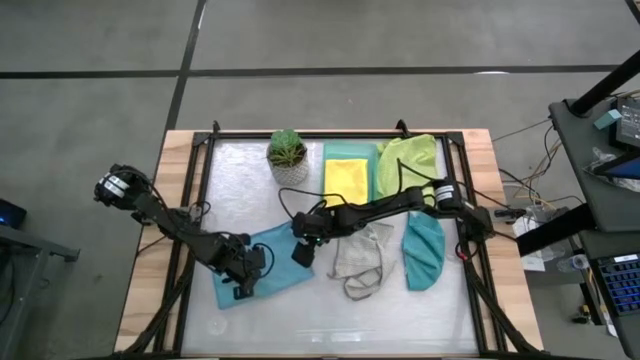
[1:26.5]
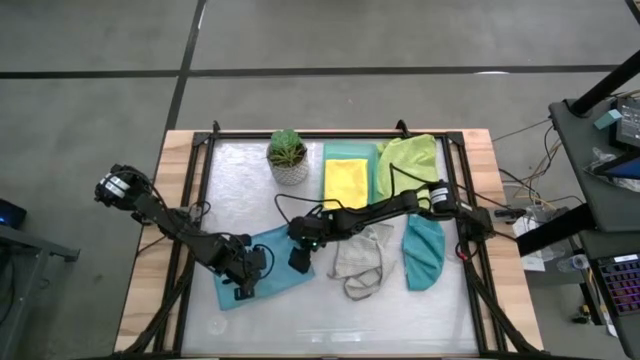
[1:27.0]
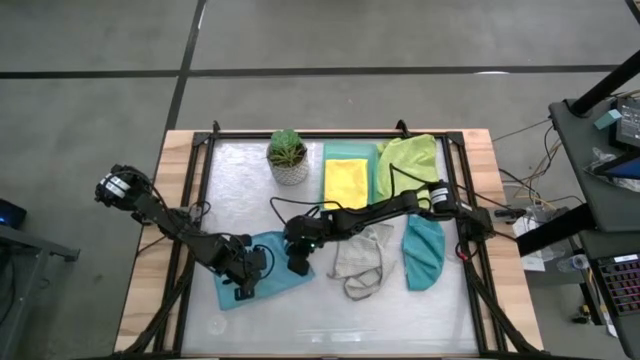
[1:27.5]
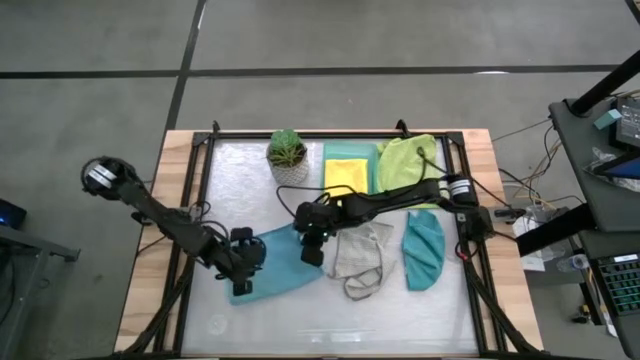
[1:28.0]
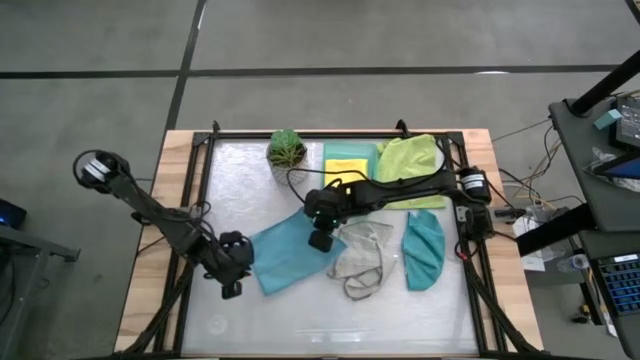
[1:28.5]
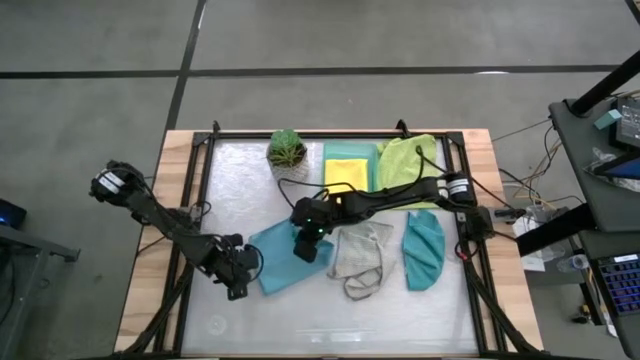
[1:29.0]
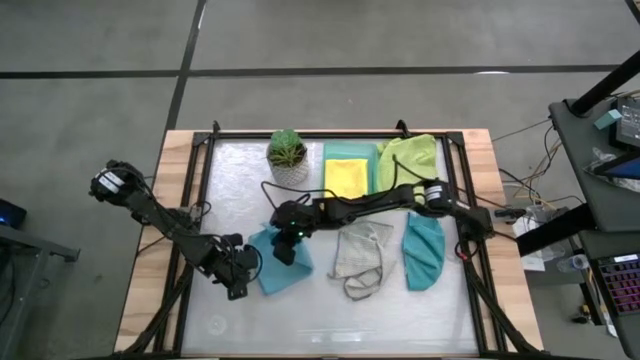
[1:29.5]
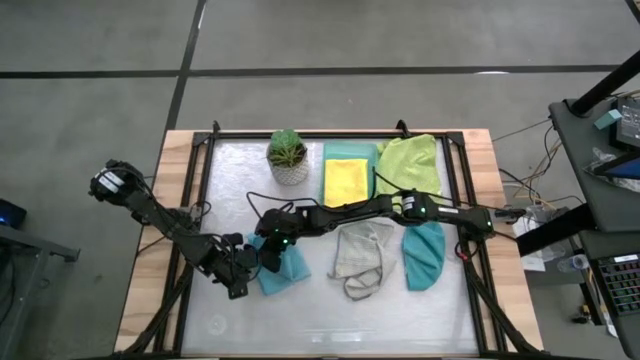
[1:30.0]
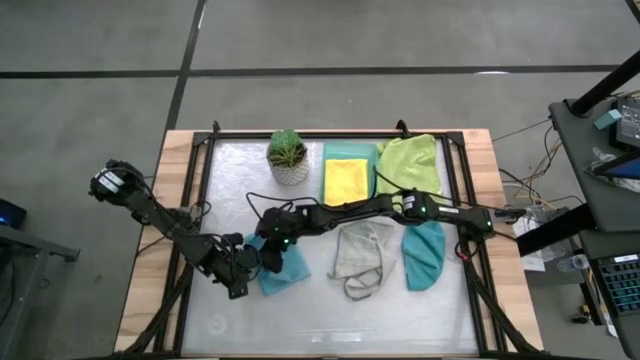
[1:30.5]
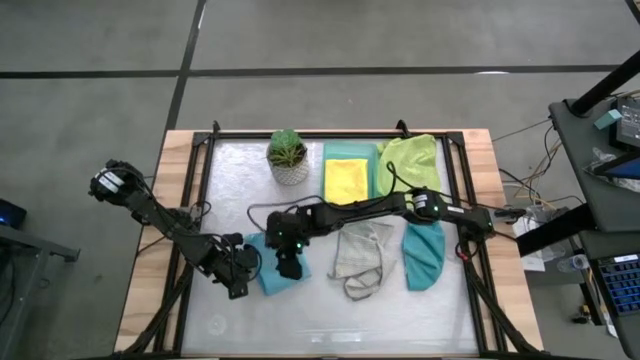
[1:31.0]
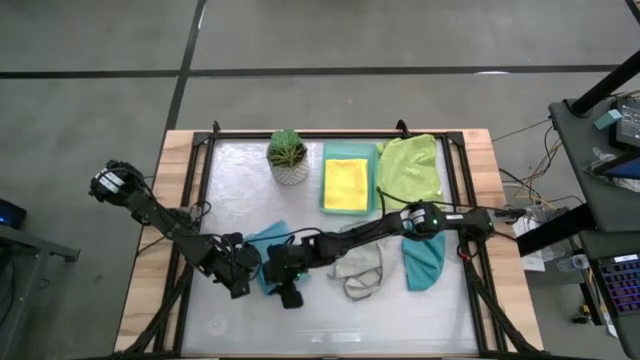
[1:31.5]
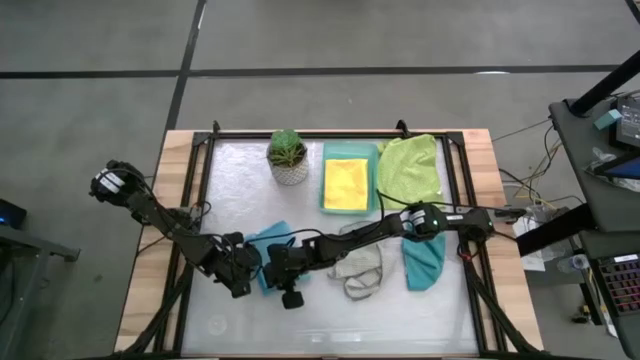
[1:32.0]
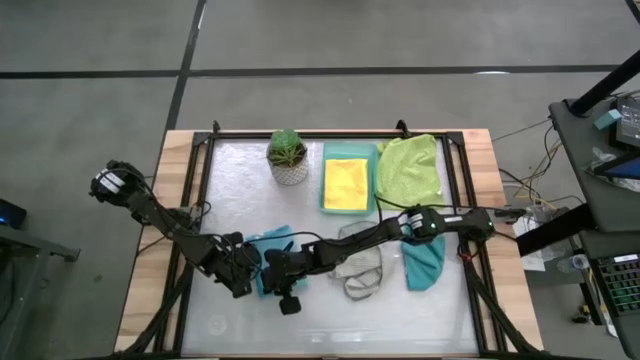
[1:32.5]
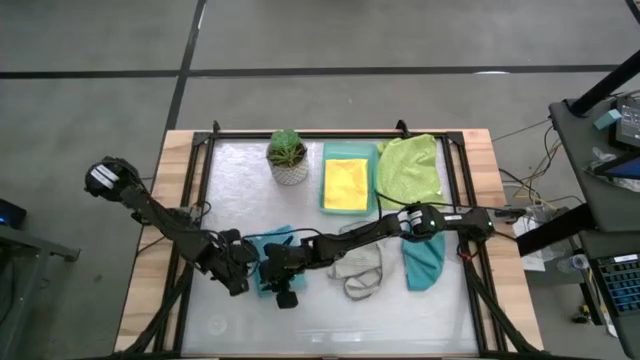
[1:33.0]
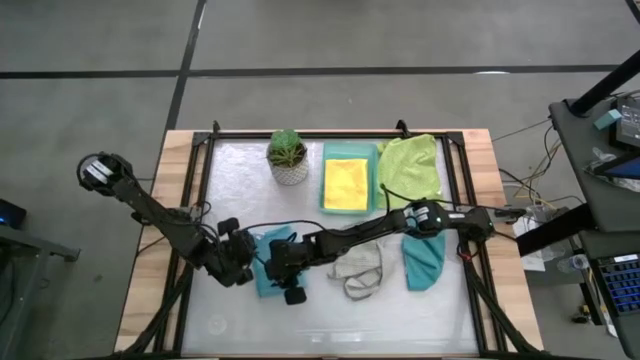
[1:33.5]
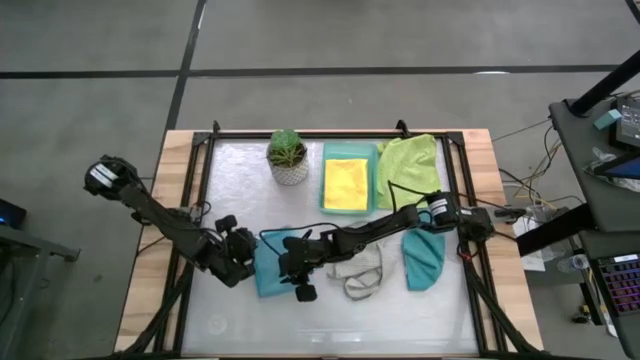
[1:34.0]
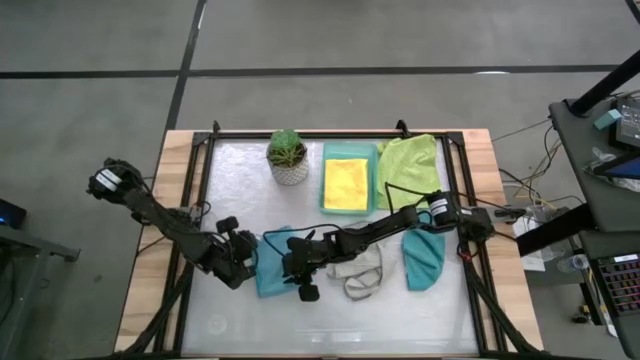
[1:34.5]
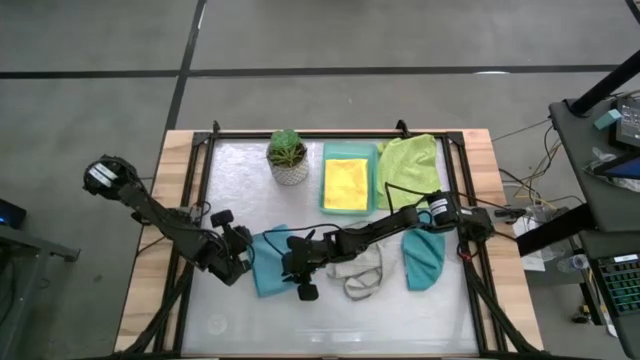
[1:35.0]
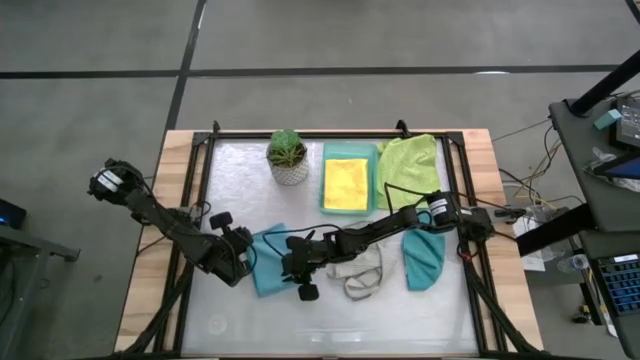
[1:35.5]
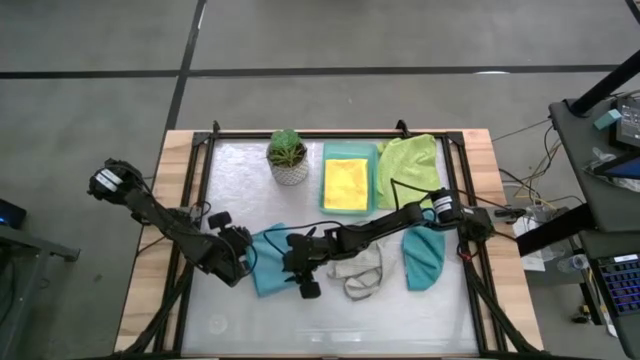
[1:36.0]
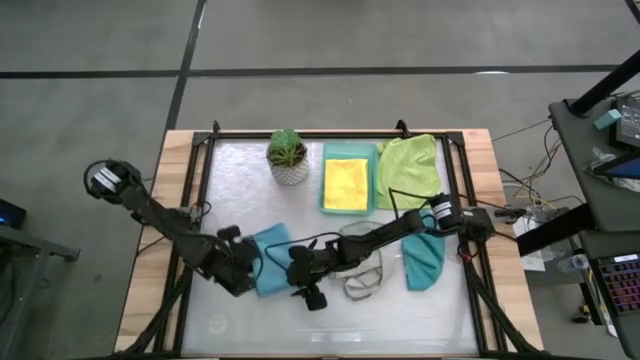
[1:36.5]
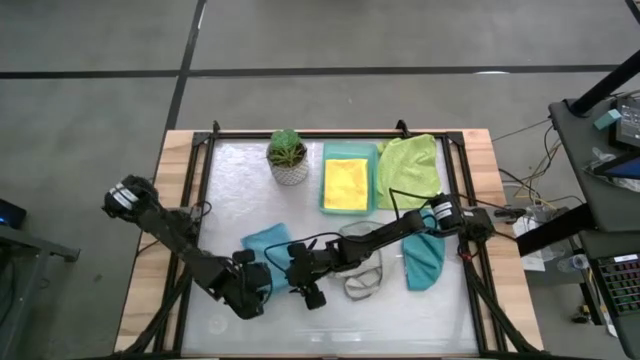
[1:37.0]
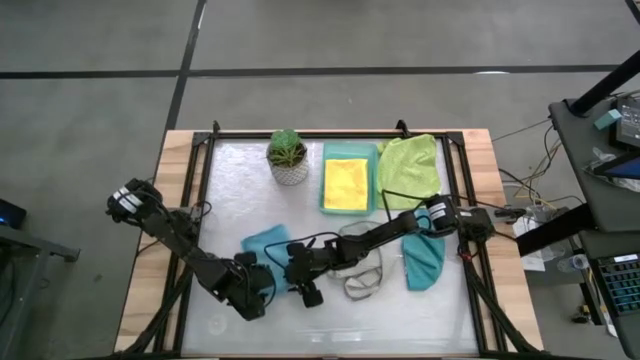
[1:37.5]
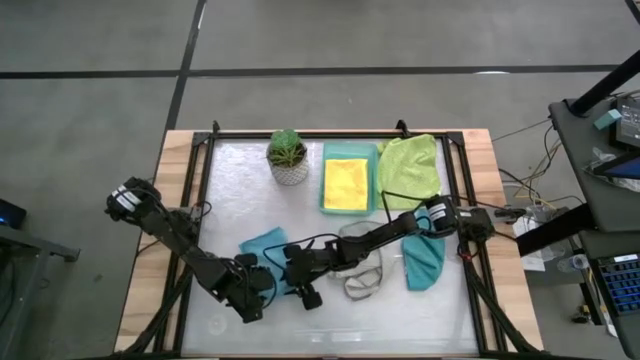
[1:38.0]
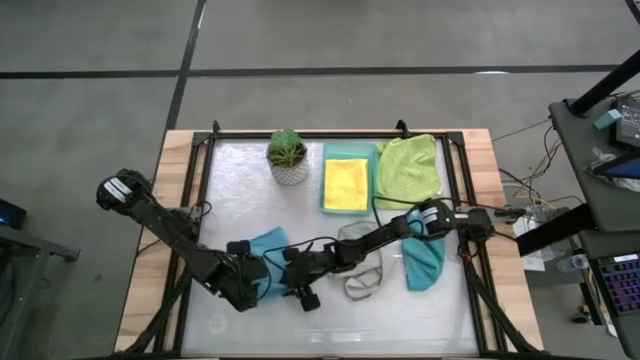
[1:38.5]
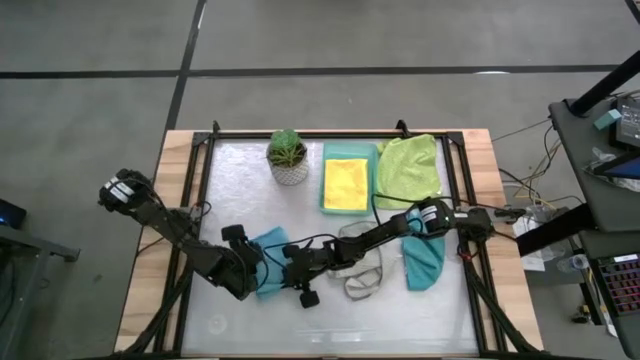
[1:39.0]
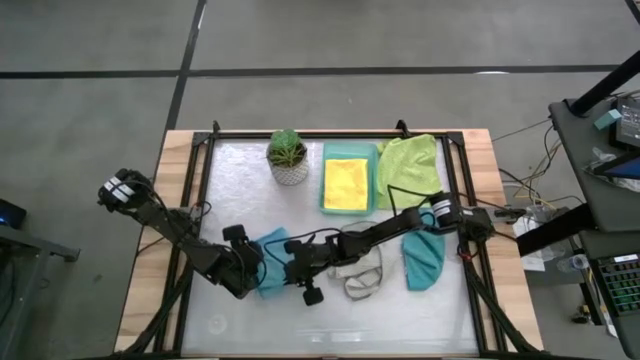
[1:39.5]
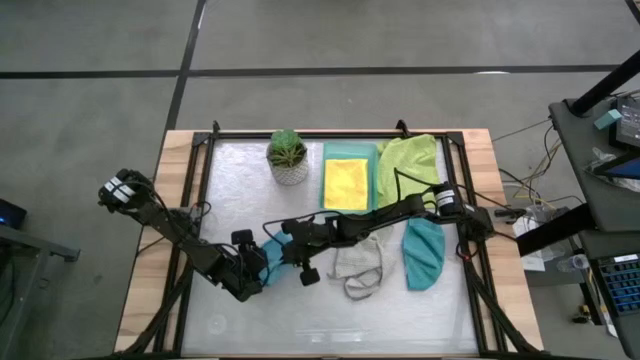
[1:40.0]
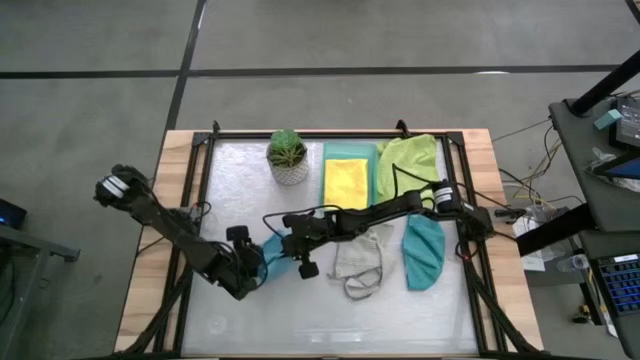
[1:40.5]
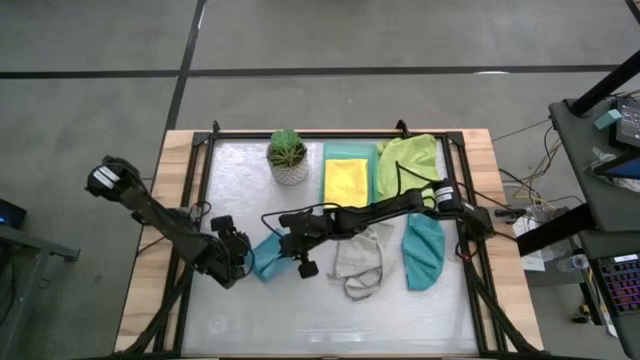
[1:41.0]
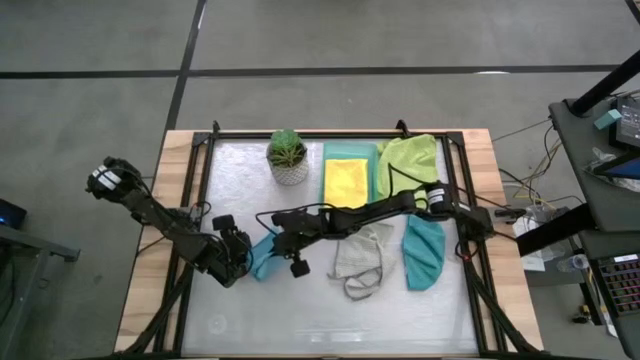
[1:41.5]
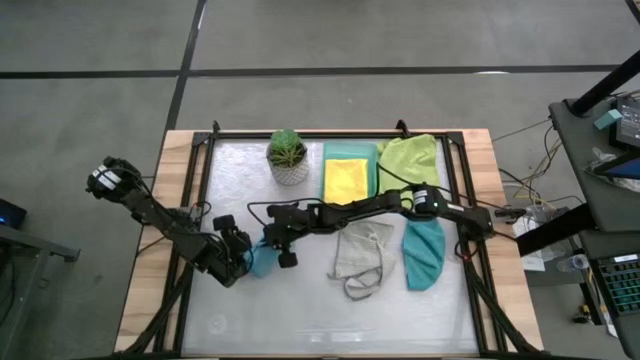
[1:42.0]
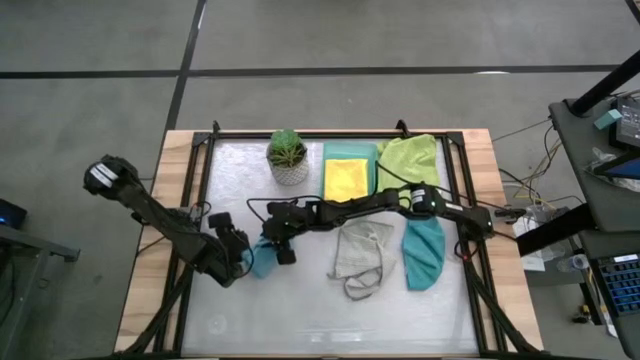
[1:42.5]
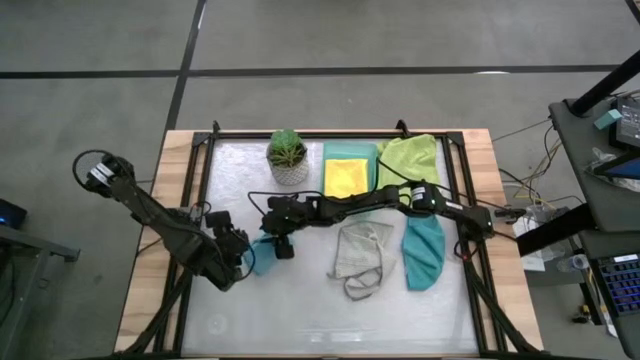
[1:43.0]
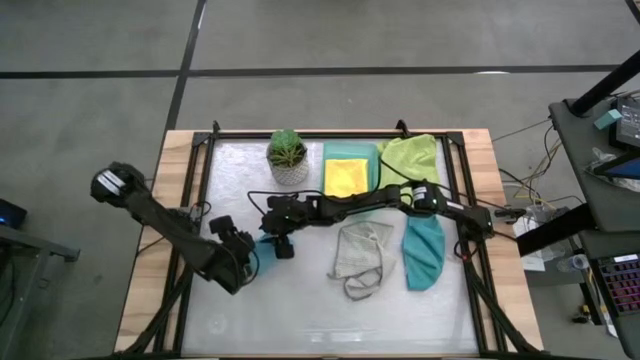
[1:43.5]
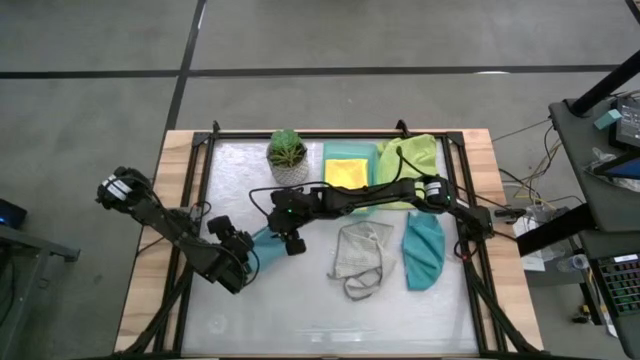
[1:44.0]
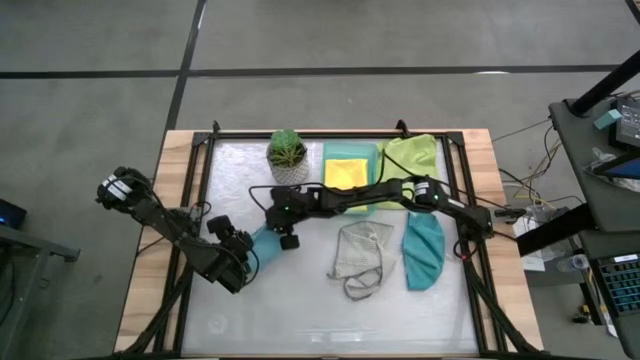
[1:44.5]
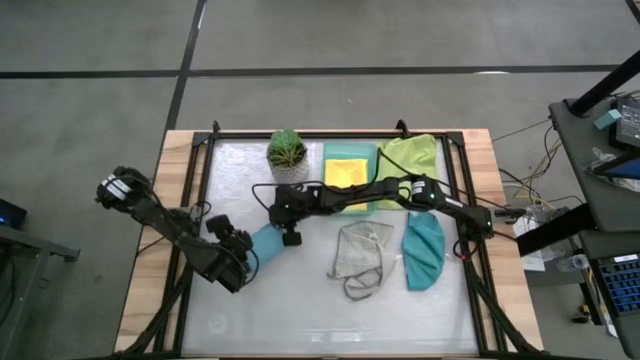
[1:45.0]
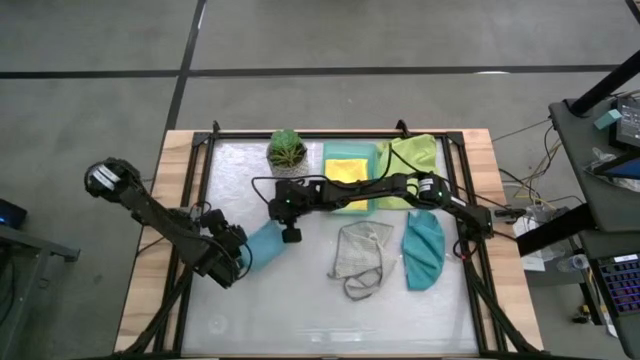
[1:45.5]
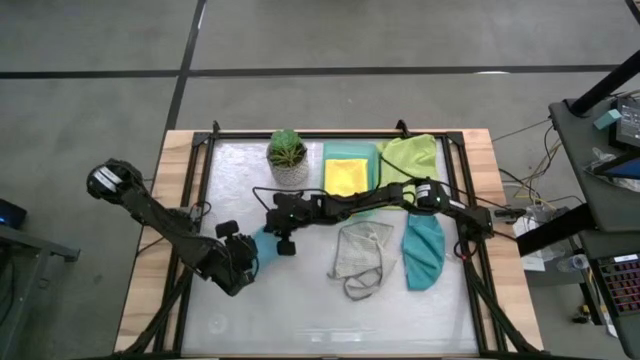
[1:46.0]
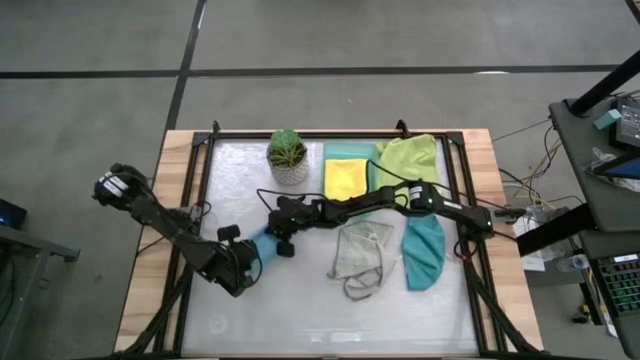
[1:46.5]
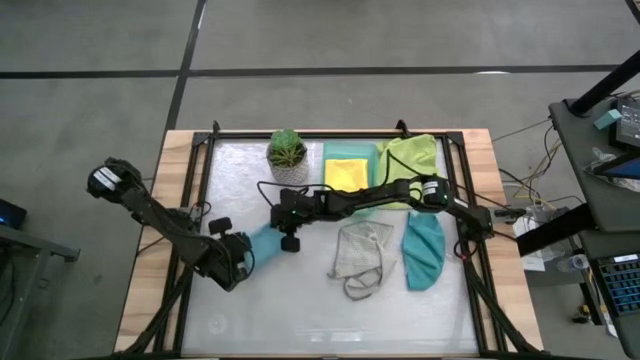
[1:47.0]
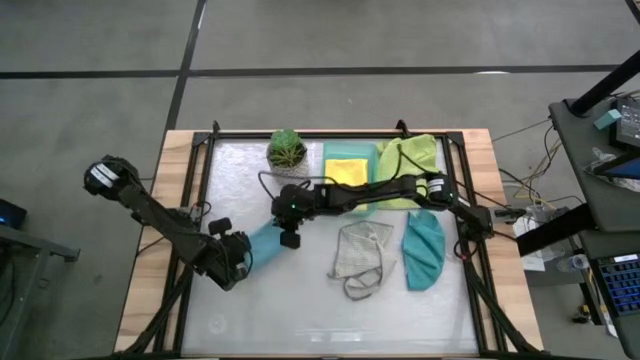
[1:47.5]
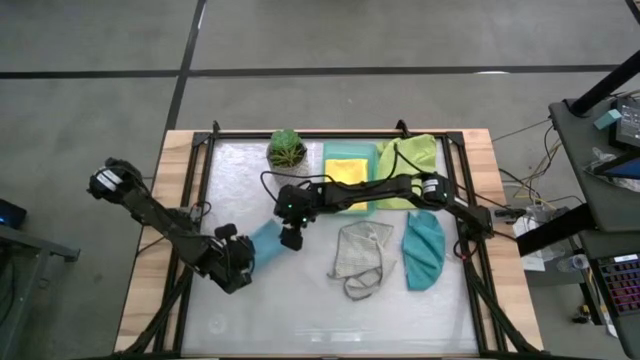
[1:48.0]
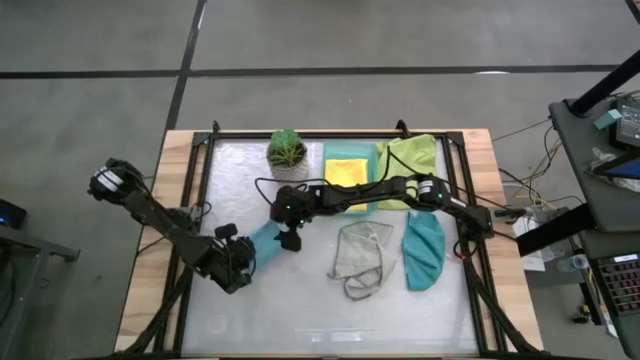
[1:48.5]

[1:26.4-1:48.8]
Task: Fold microfiber towels
Fold the left blue microfiber cloth
